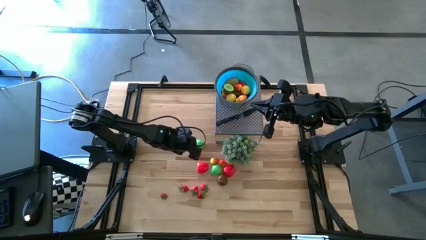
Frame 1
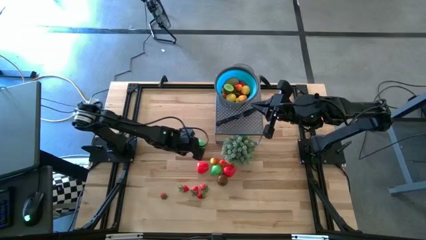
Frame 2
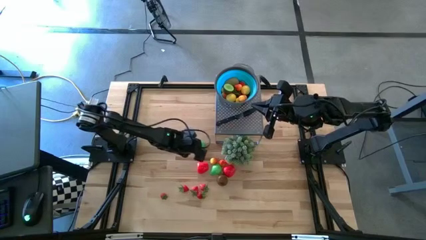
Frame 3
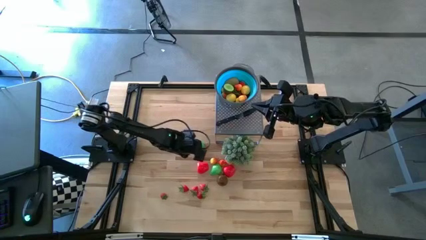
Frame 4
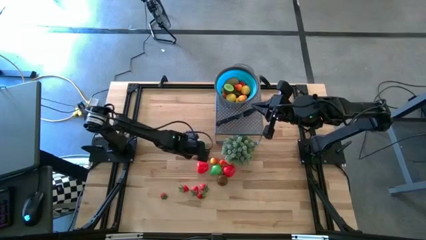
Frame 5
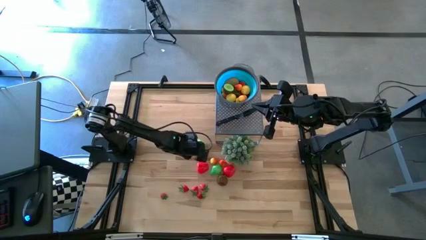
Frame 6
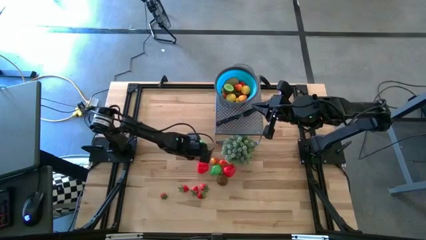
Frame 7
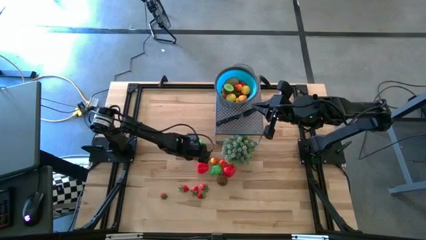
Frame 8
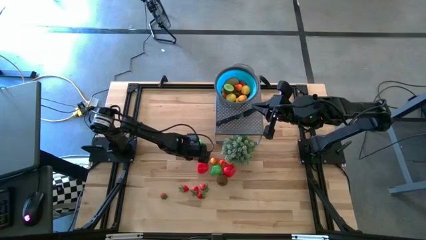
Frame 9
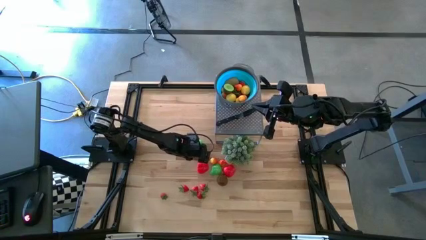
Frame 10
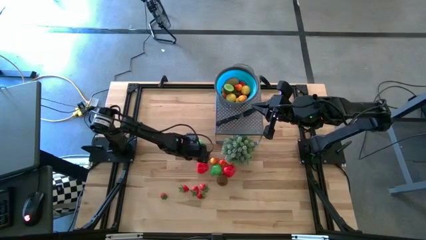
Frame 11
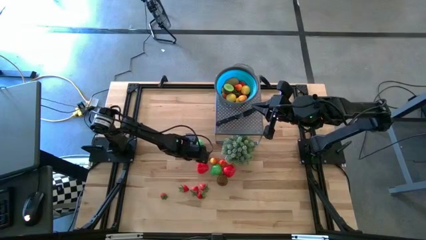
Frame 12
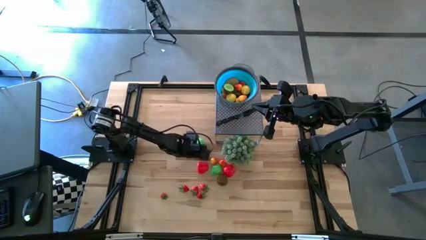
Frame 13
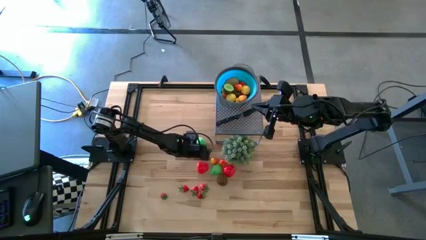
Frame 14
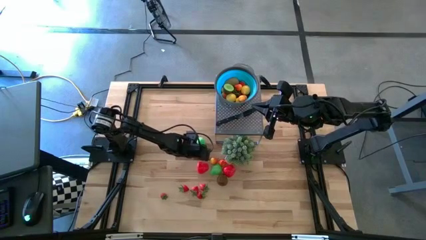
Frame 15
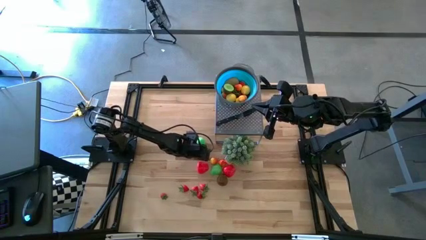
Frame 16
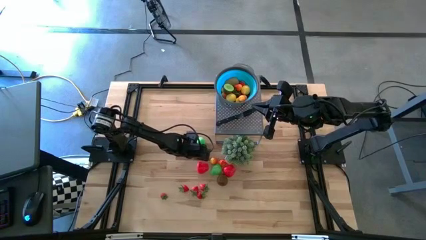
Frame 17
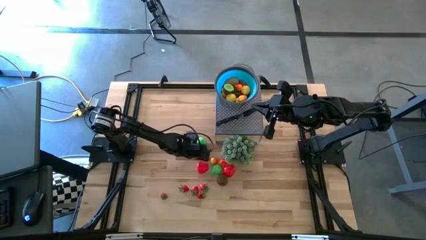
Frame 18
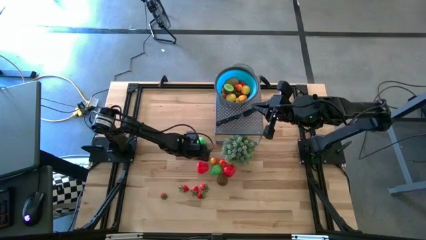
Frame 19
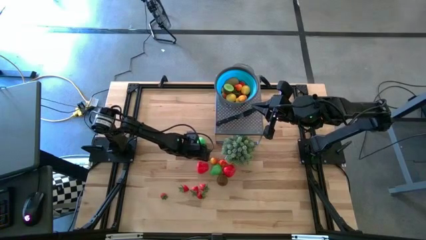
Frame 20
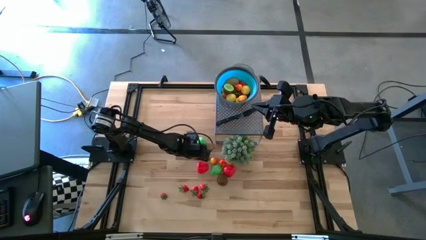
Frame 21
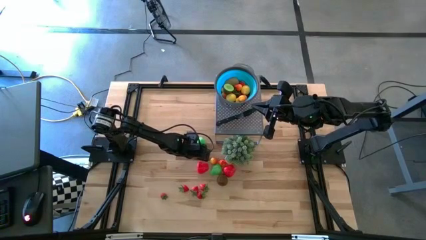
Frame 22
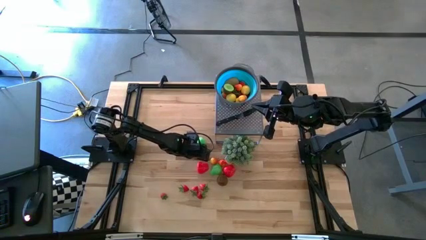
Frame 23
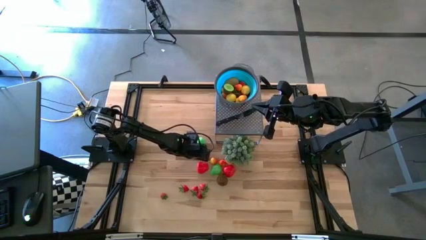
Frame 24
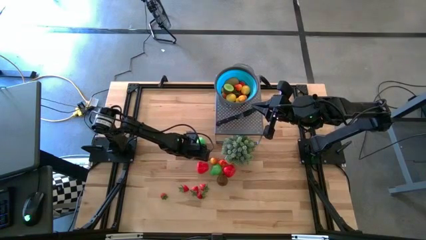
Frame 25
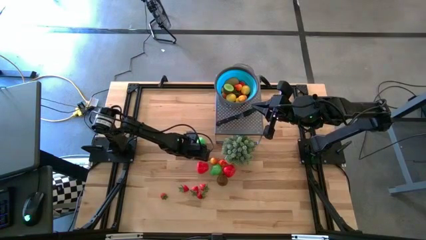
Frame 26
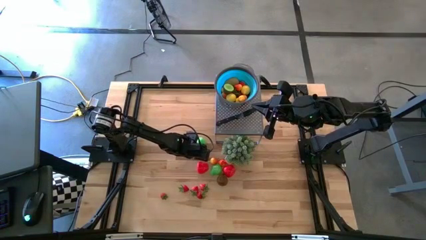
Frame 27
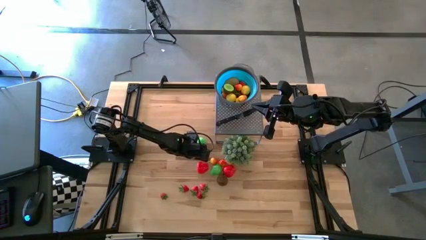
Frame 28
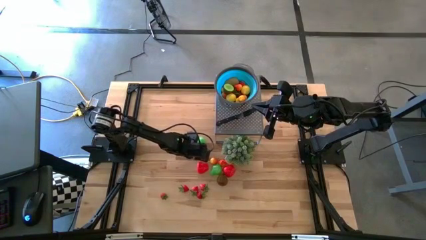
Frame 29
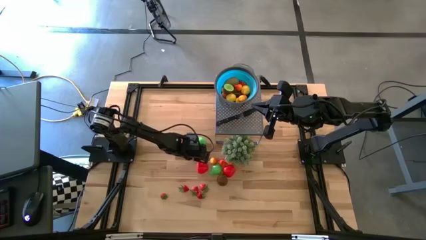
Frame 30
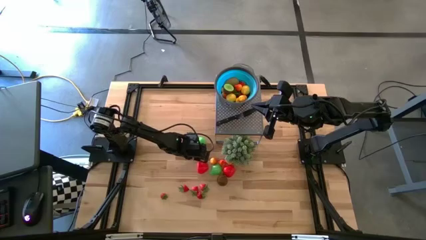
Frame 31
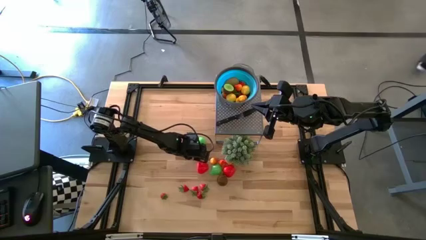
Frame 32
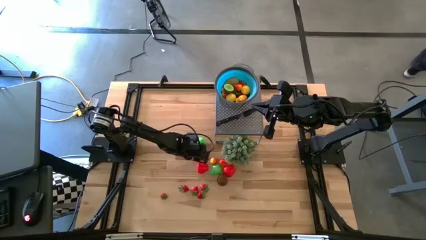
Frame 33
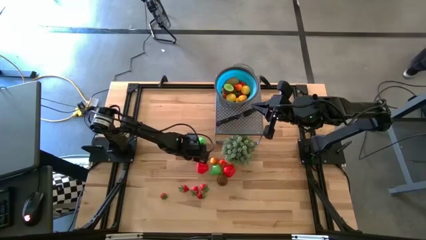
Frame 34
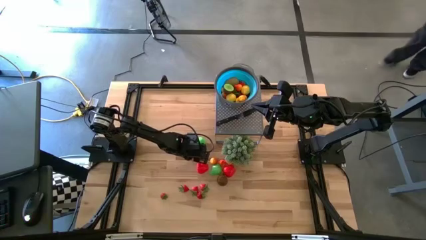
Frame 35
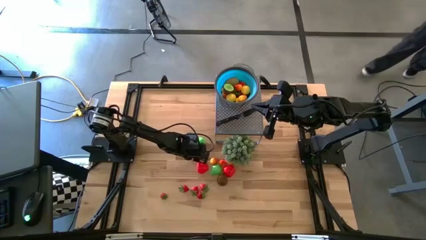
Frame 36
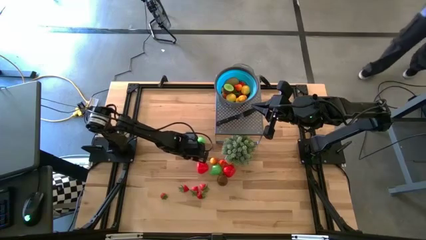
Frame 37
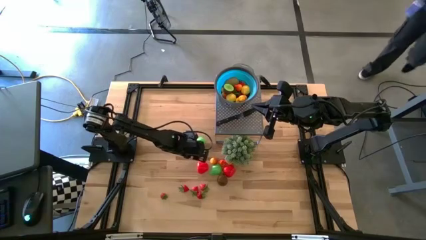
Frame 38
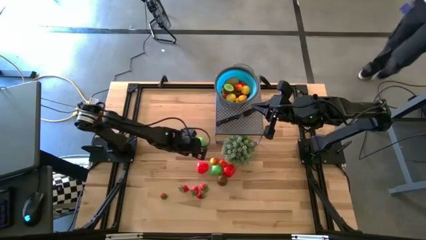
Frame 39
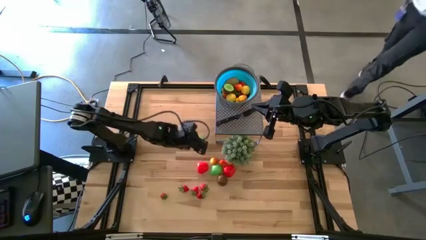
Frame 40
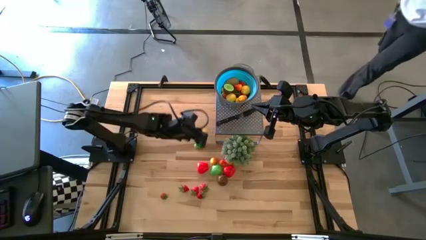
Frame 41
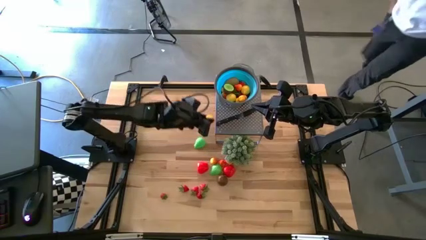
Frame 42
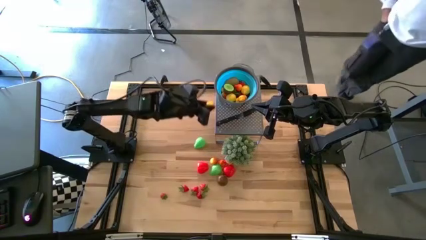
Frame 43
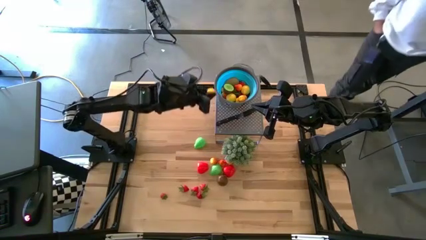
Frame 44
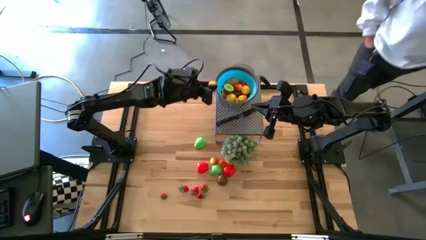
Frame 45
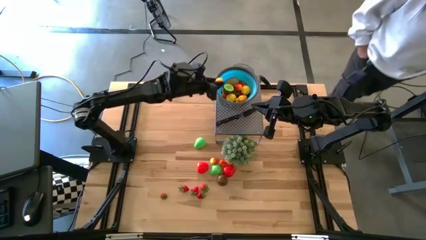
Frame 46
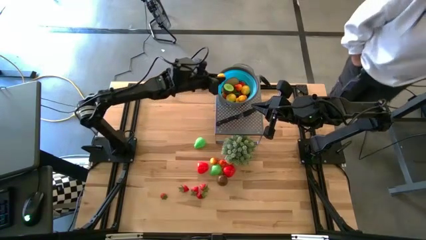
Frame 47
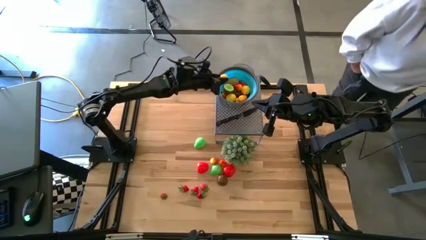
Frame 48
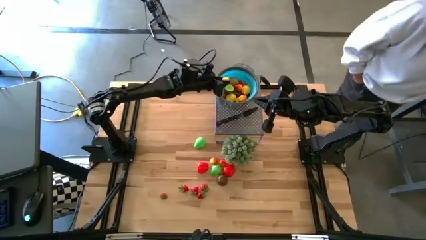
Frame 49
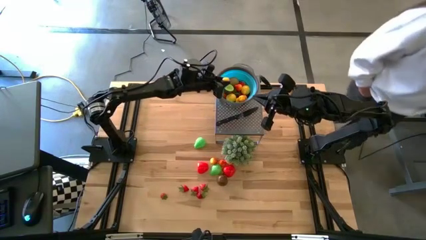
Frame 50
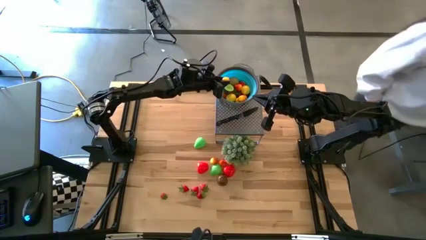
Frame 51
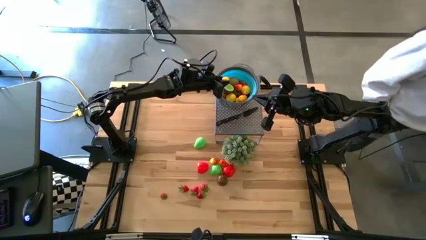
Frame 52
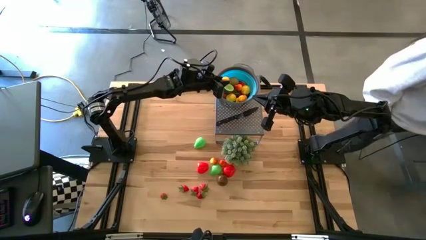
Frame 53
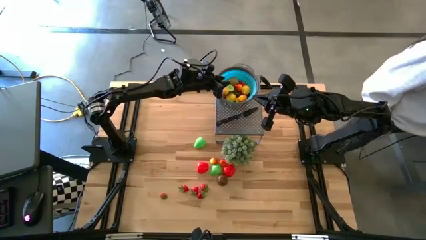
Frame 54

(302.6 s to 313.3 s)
Task: Pick & Place Fruit
Put the orange pear into the blue strainer bowl

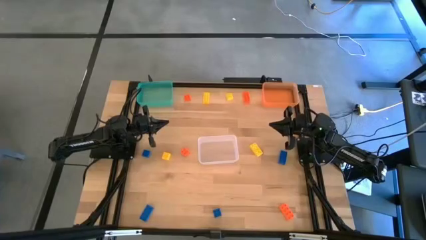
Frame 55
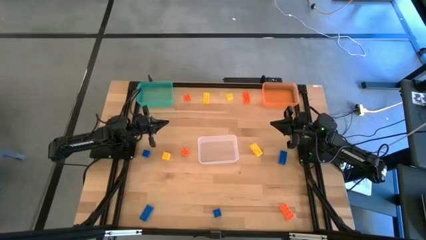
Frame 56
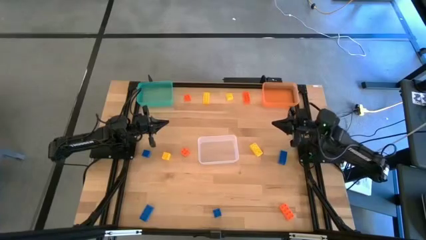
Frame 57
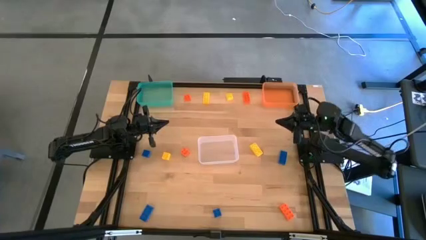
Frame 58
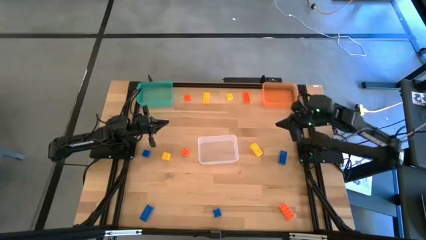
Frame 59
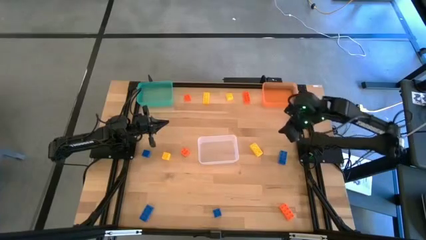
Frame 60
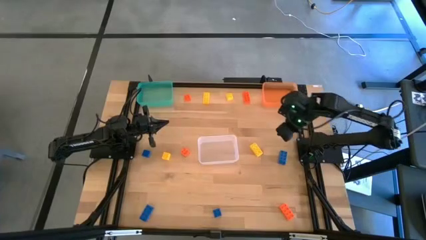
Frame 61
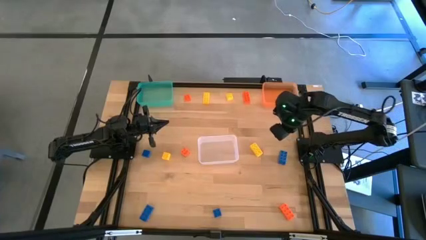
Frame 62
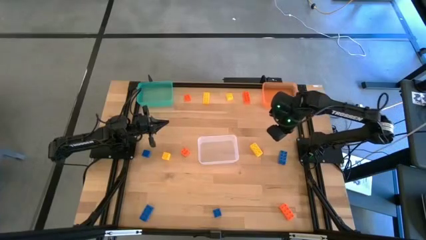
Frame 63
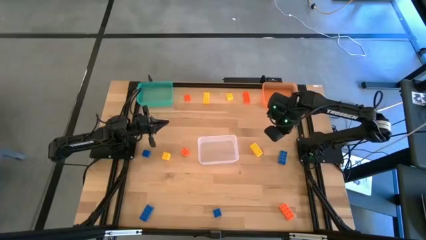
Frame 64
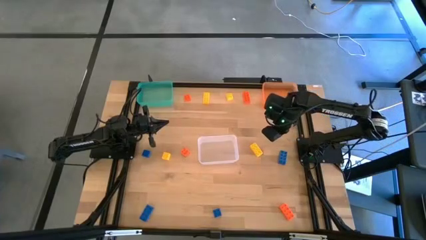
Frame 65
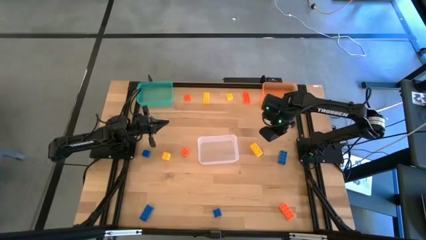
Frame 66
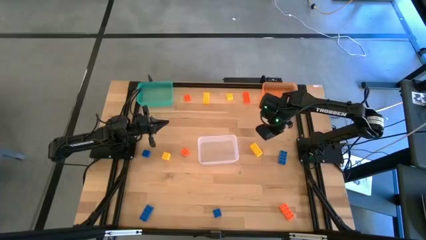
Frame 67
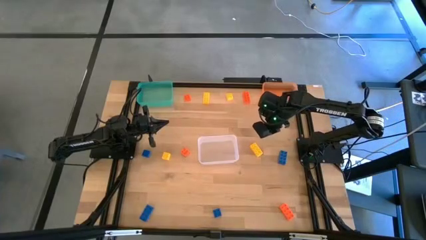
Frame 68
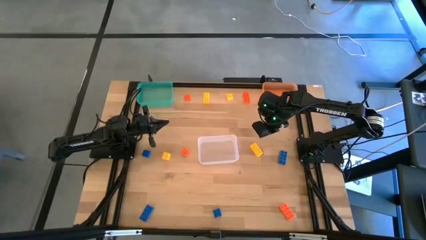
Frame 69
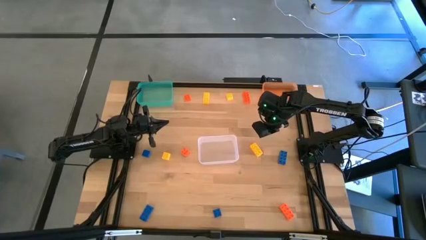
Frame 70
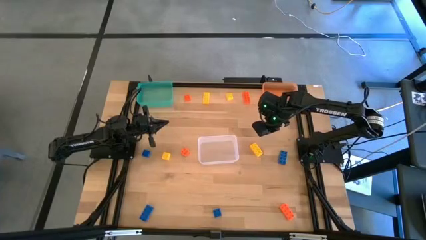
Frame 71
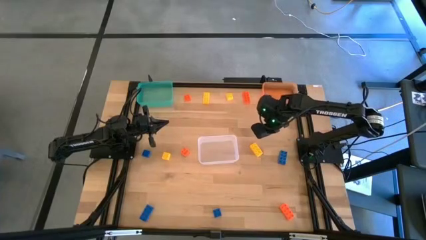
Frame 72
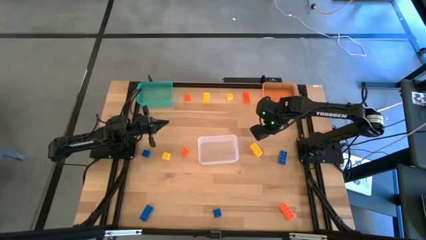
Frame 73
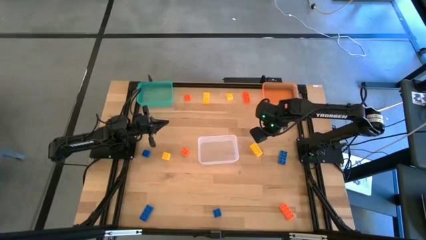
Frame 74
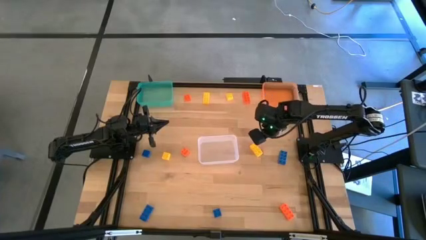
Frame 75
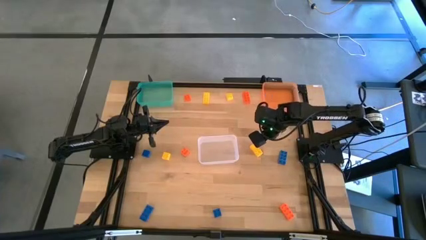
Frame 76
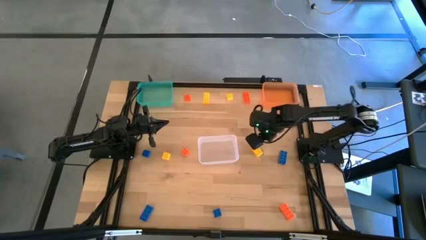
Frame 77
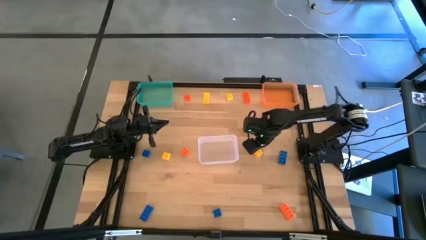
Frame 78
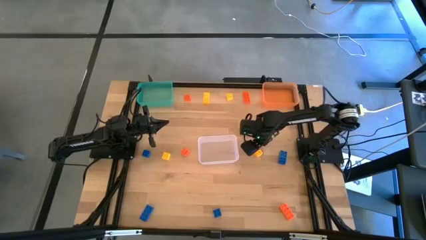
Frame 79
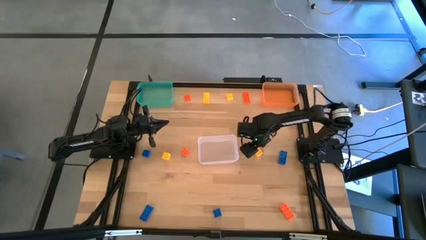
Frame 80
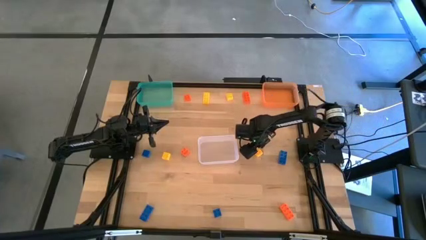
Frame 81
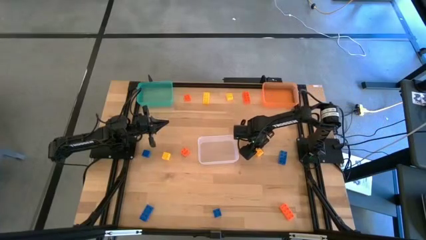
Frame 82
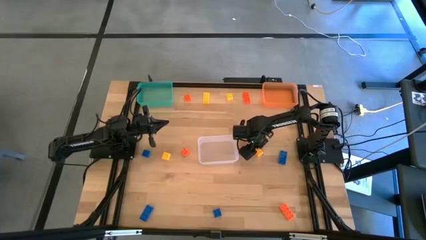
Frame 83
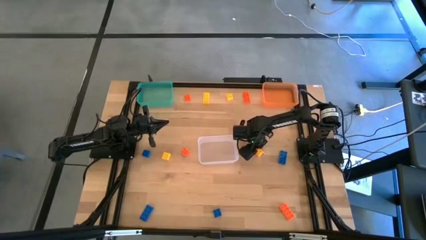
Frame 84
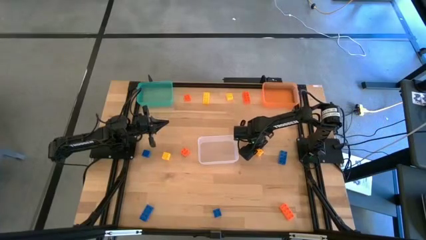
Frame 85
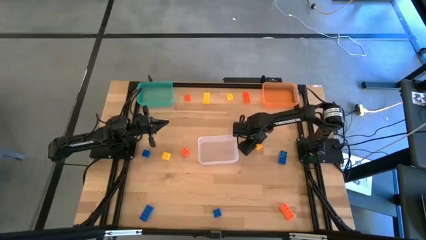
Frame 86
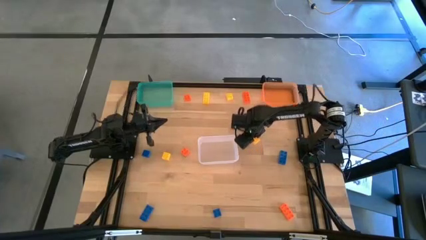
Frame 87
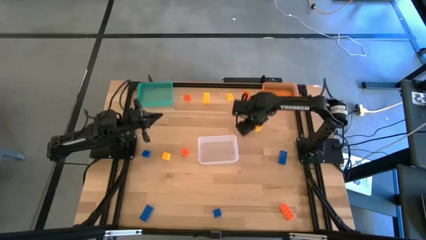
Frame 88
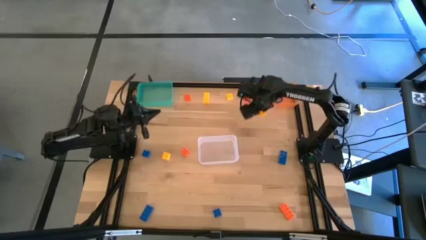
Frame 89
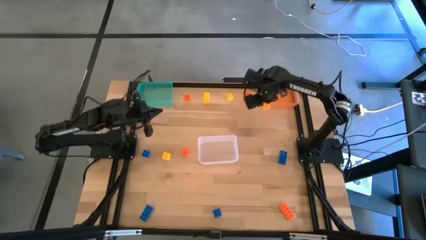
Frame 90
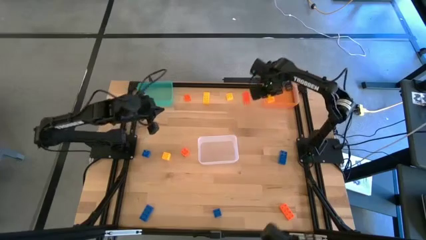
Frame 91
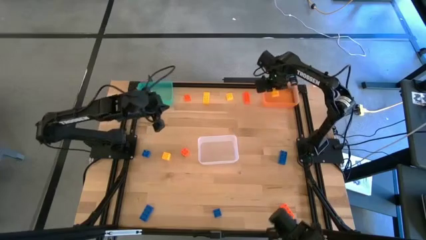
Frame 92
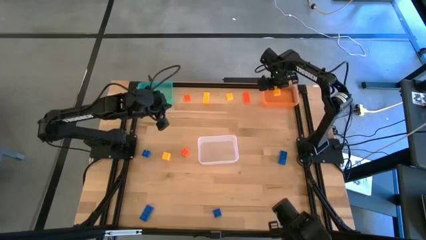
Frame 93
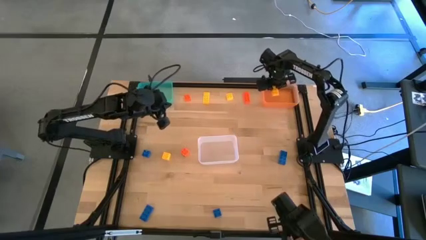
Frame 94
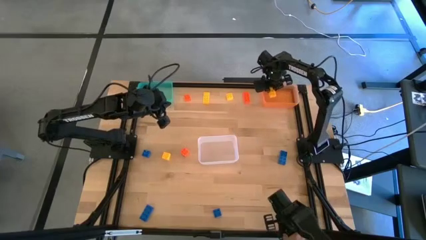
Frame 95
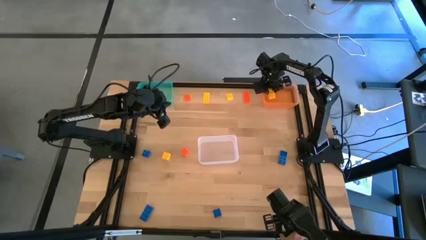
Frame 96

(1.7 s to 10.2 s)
Task: Sort & place blocks by color
Put the bottom right yellow game piece into the orange bin
